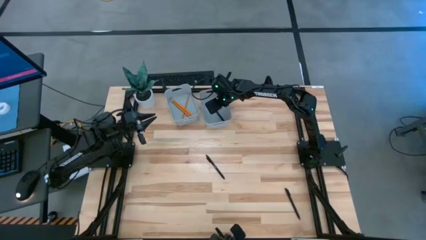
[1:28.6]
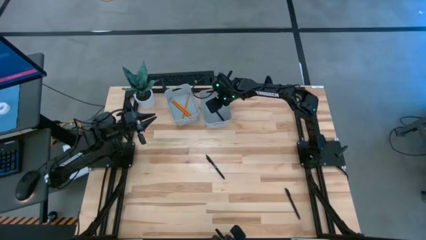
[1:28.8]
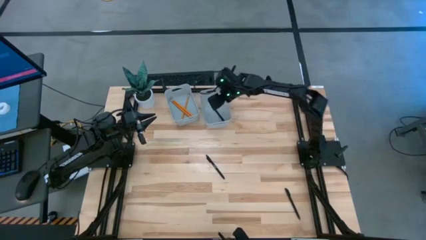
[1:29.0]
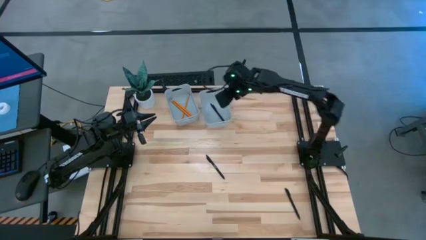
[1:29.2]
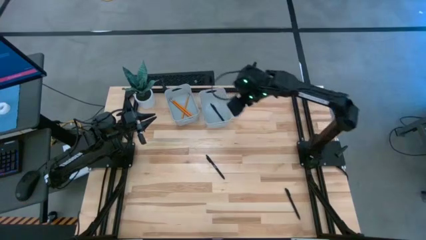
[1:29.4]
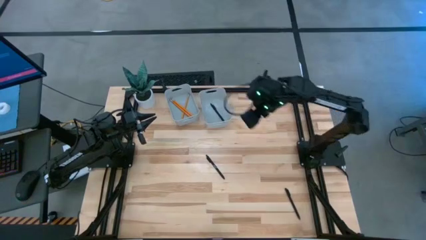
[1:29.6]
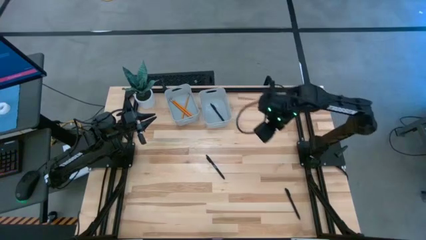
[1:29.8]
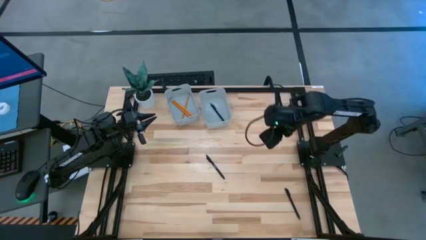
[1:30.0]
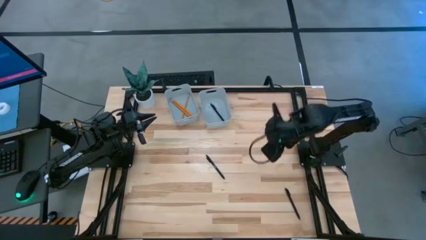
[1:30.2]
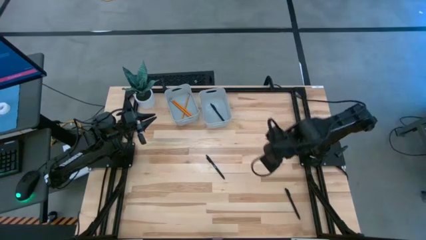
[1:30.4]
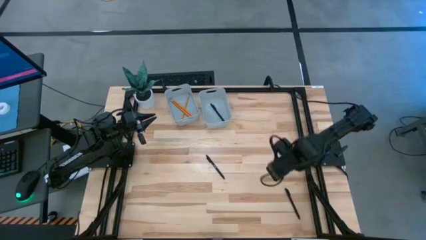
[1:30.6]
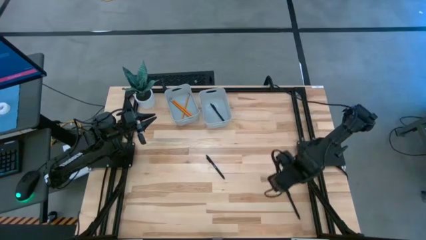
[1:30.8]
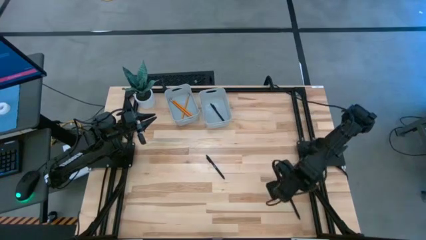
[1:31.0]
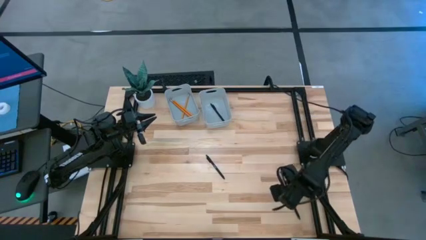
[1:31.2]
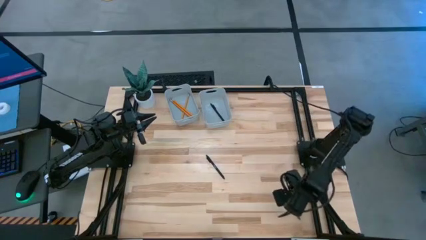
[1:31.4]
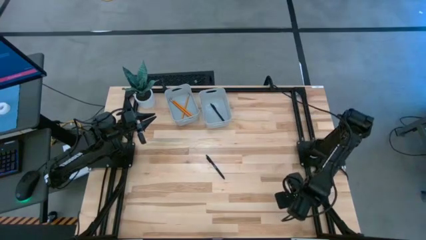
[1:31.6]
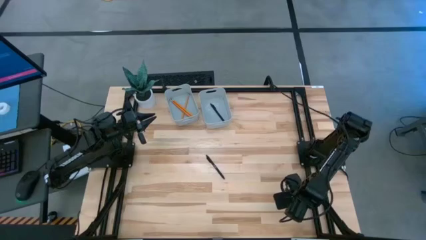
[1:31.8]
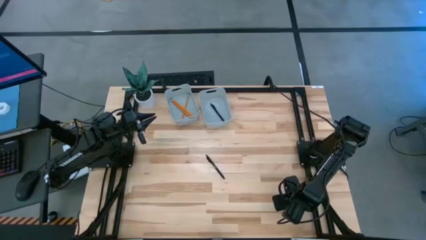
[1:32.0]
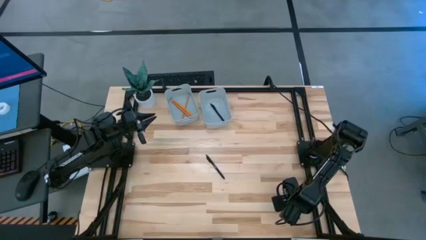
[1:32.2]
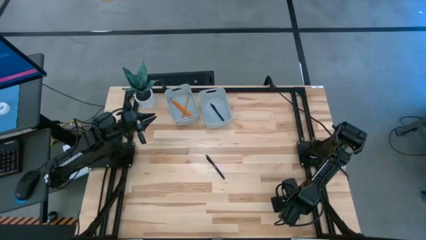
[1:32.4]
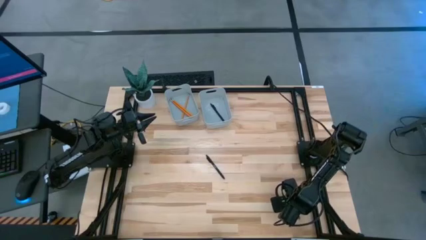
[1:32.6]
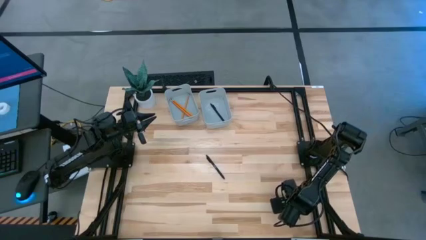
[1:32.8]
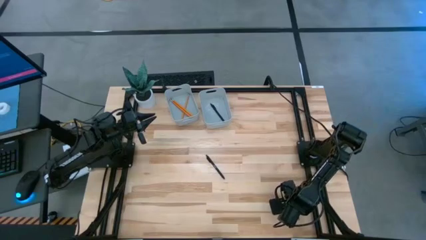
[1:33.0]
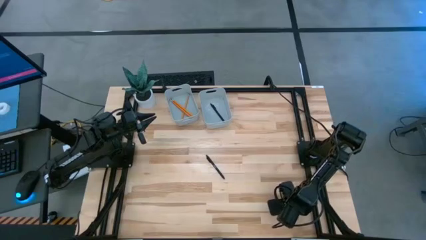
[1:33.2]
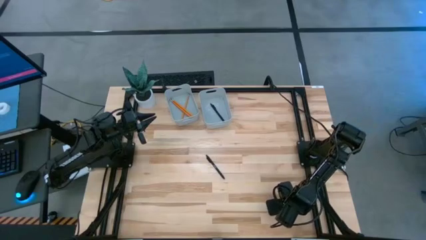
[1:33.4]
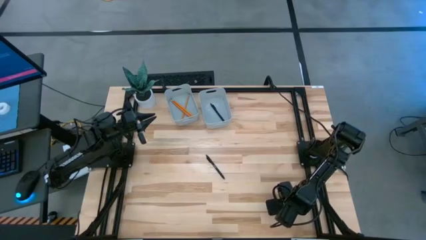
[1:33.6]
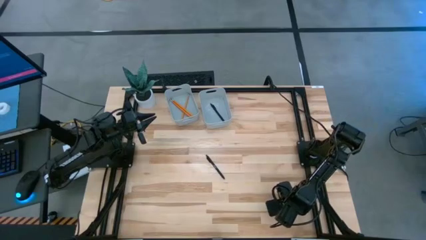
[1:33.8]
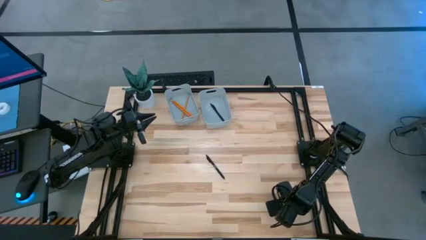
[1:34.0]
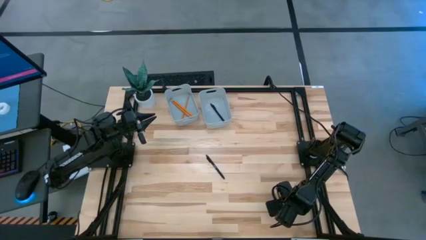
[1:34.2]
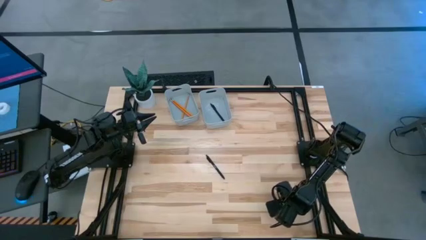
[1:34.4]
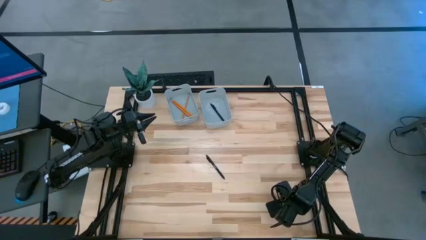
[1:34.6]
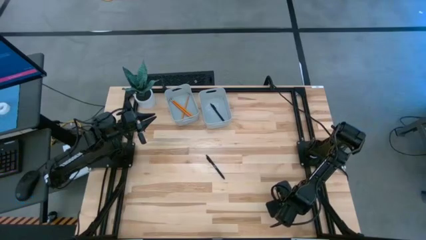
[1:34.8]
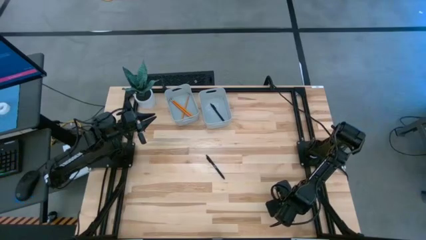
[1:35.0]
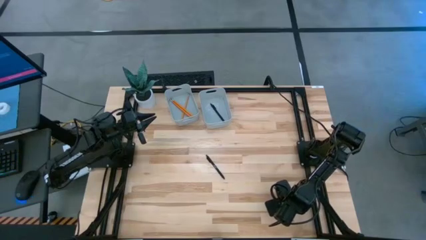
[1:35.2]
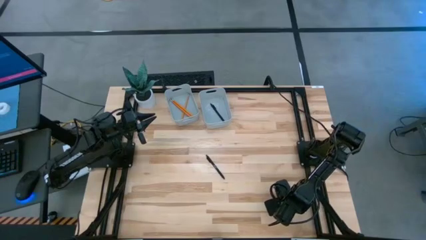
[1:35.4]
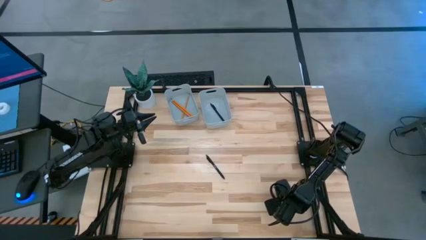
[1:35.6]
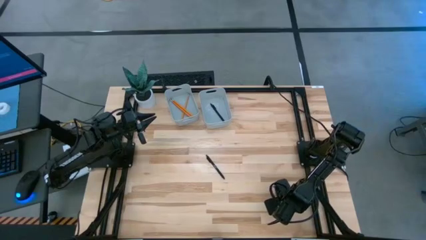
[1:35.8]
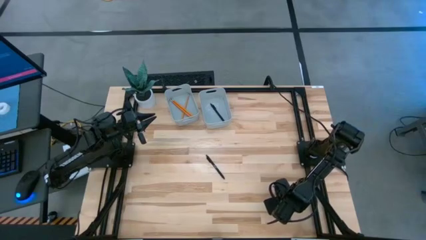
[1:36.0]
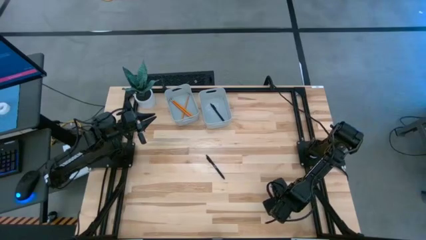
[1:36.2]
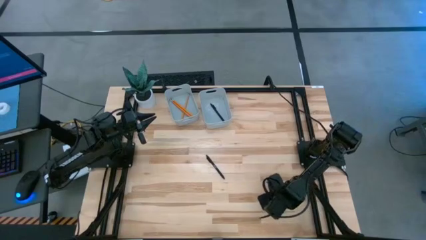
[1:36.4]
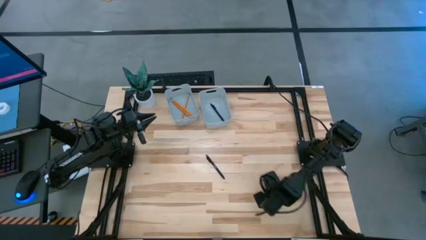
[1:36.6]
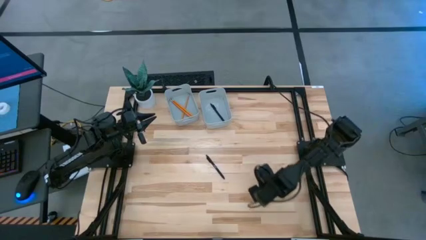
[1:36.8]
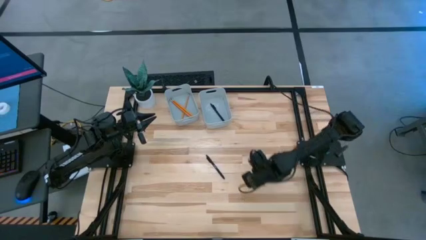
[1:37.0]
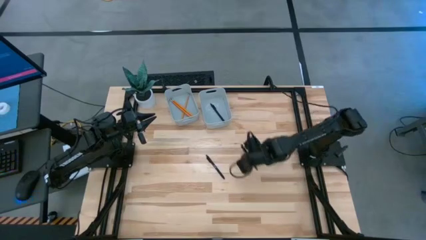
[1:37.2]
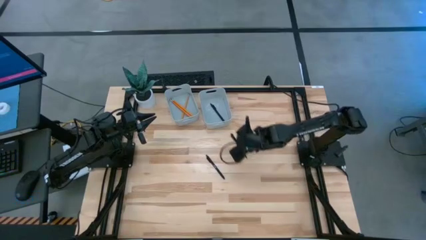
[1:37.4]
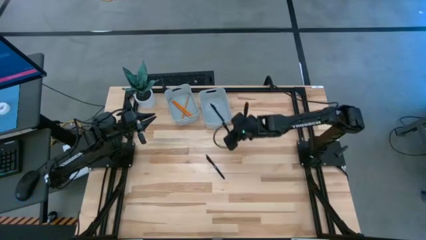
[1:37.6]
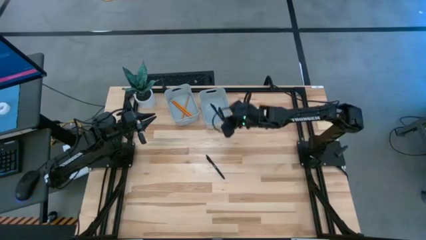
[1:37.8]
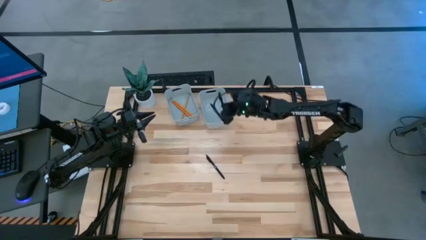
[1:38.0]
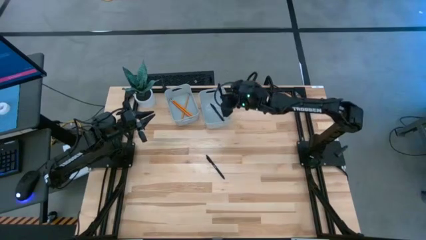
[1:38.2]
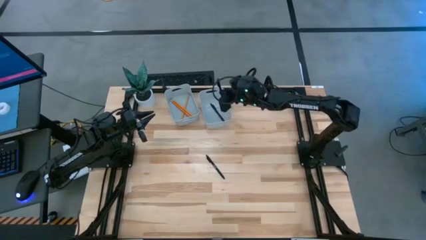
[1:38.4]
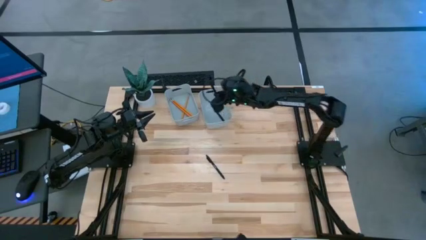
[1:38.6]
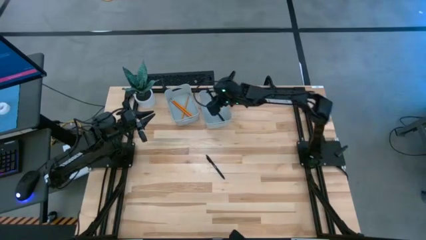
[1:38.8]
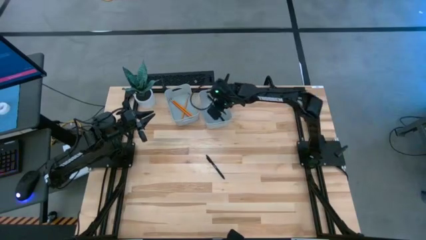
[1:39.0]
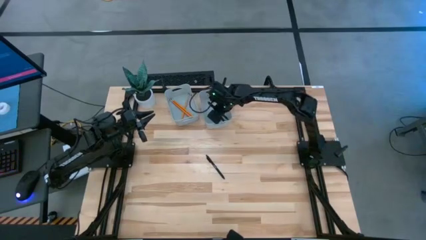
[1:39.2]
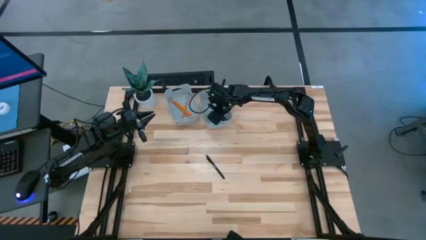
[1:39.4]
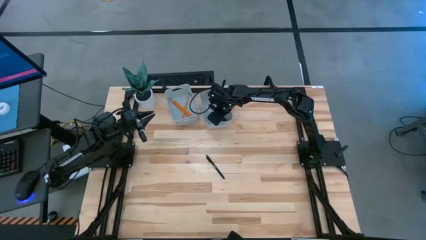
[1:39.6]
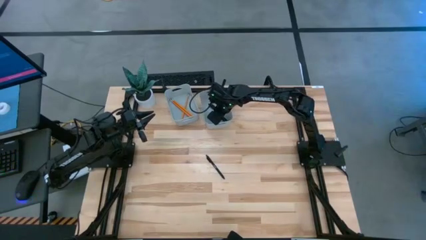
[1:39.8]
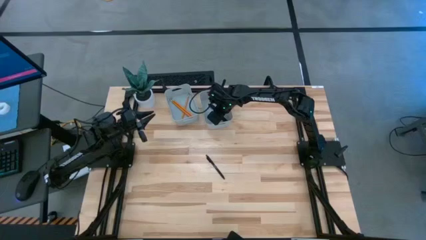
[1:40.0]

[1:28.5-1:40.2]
Task: Sort pens & pencils
Put the bottom black ballpen into the right bin

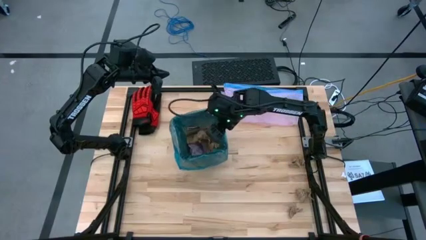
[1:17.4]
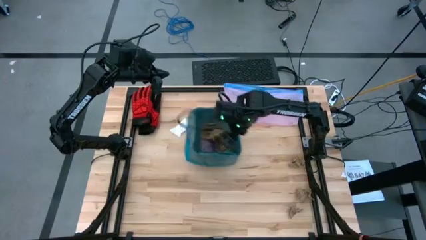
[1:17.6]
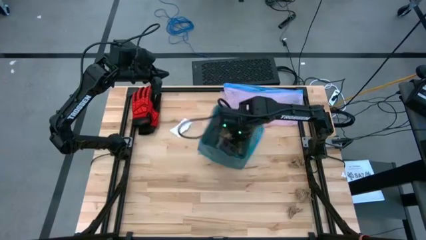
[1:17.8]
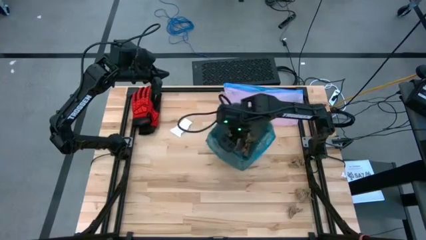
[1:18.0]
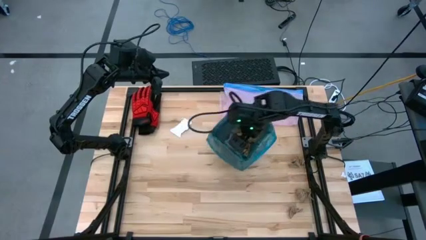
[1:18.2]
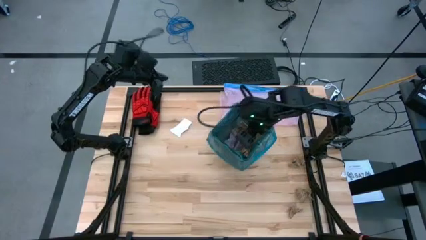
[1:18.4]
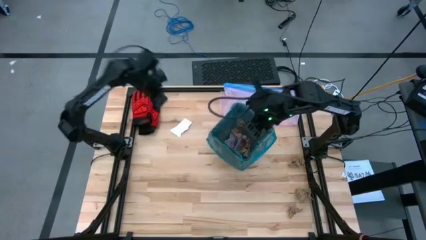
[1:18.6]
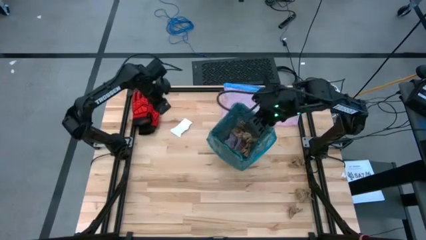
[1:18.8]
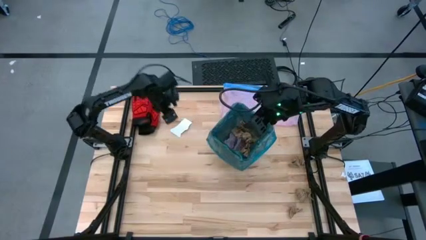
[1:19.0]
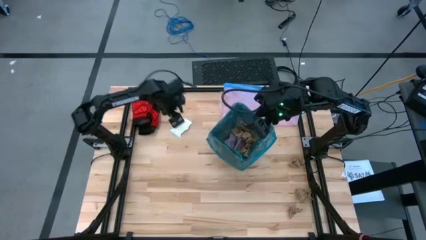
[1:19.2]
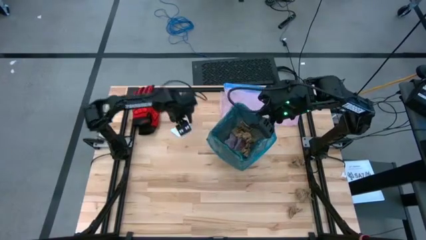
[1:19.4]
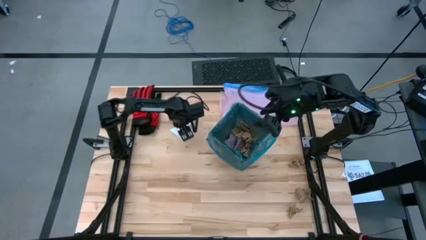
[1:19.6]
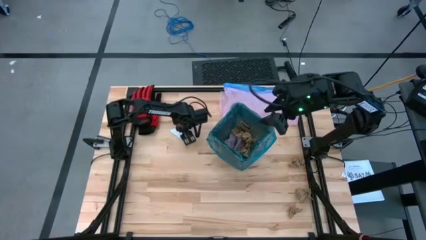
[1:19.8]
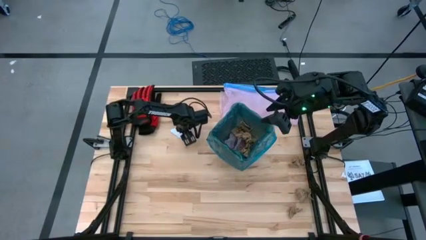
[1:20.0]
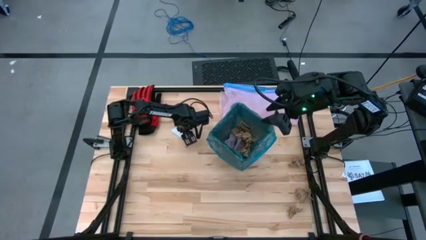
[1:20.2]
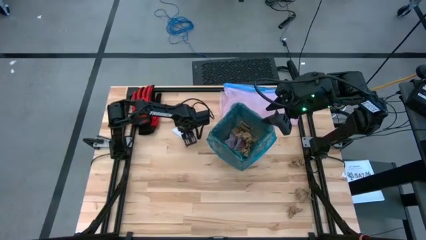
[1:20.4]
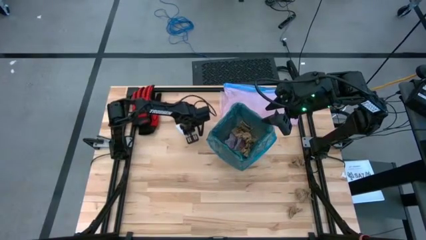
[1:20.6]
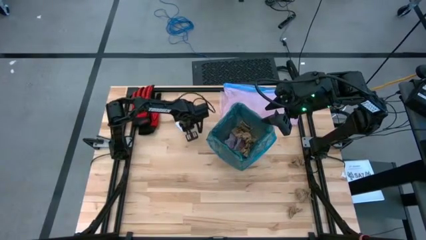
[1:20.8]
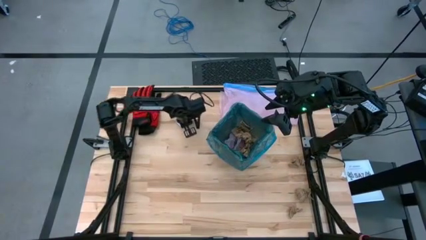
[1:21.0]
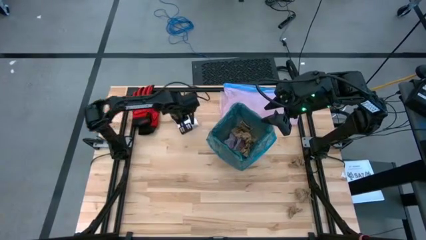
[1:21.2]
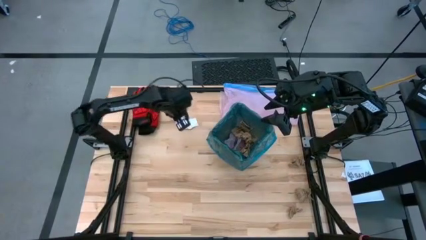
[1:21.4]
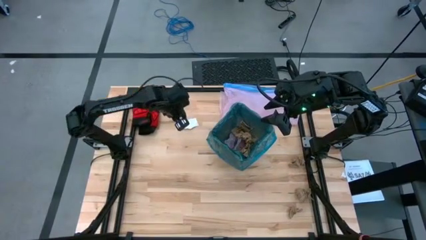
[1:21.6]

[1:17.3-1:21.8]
Task: place trash/remove bag and relplace
Put the piece of white cardboard into the black trash bin
